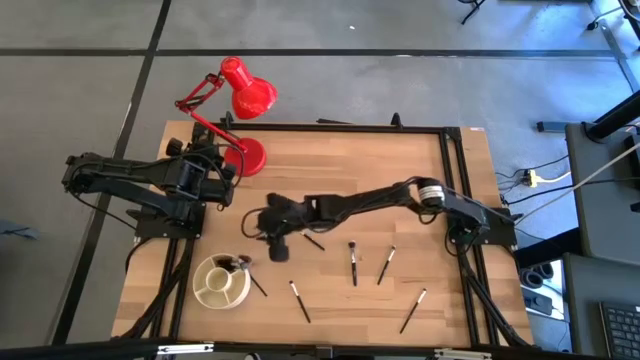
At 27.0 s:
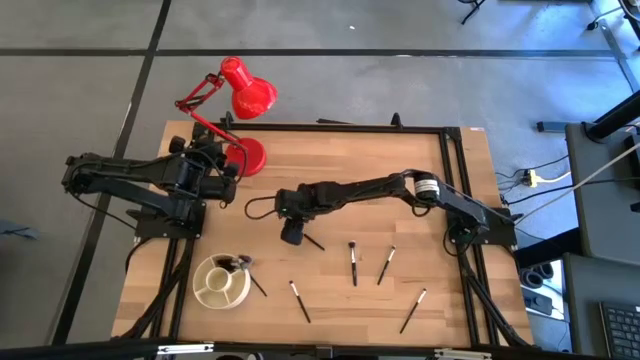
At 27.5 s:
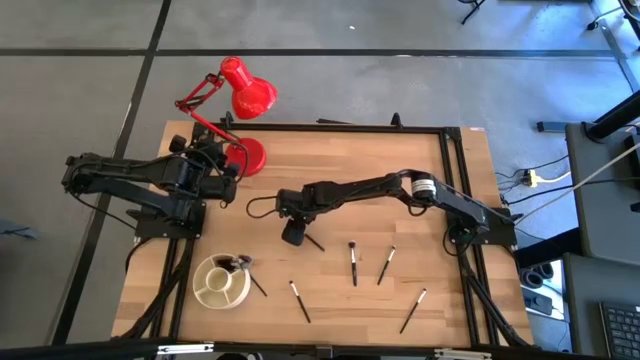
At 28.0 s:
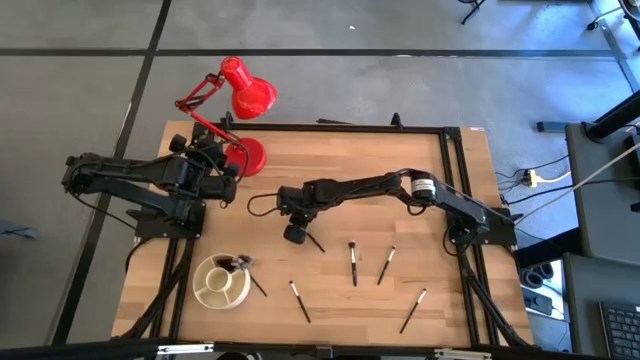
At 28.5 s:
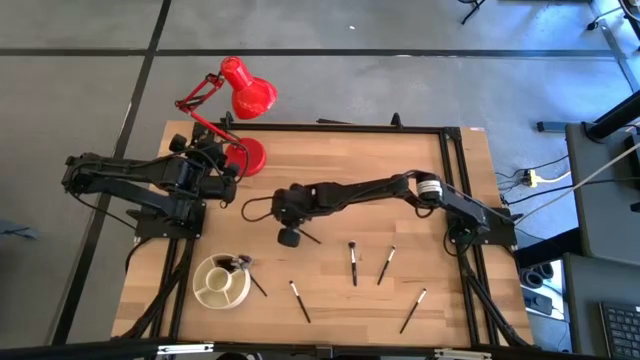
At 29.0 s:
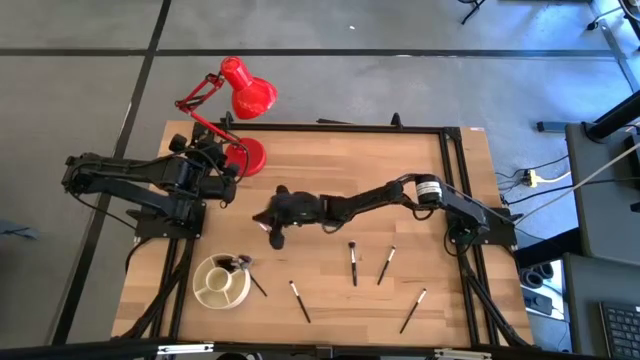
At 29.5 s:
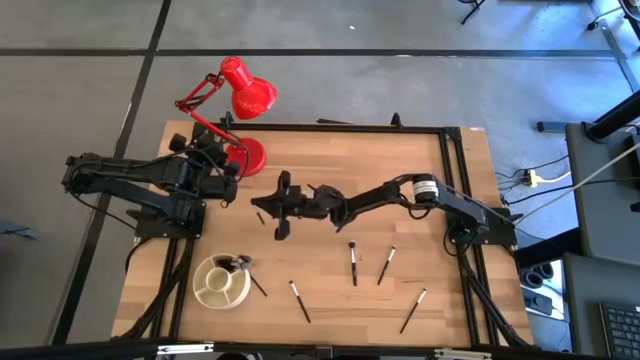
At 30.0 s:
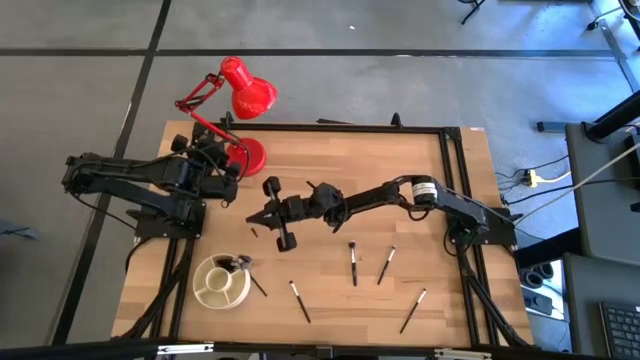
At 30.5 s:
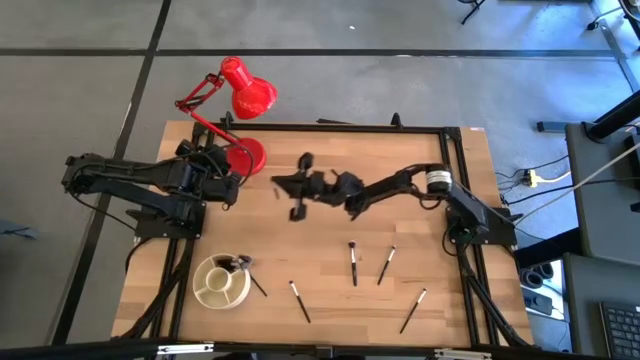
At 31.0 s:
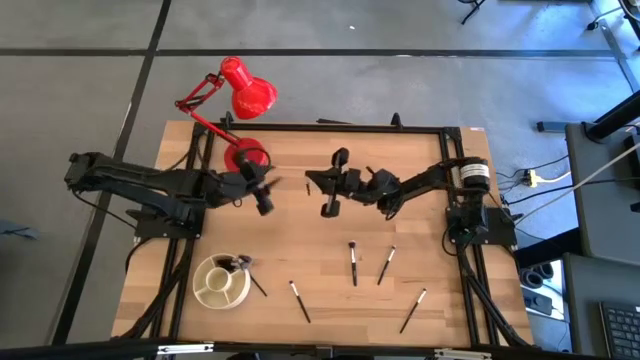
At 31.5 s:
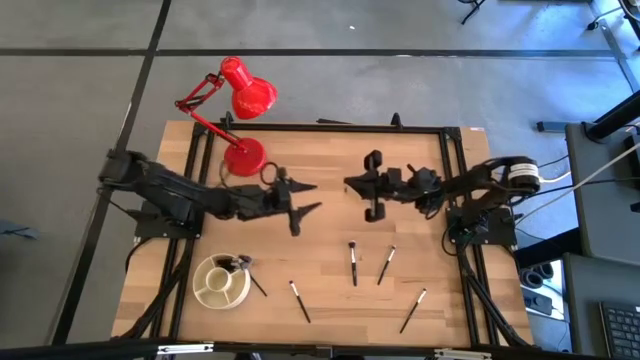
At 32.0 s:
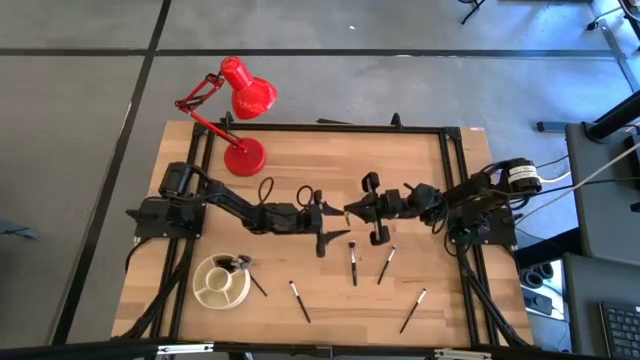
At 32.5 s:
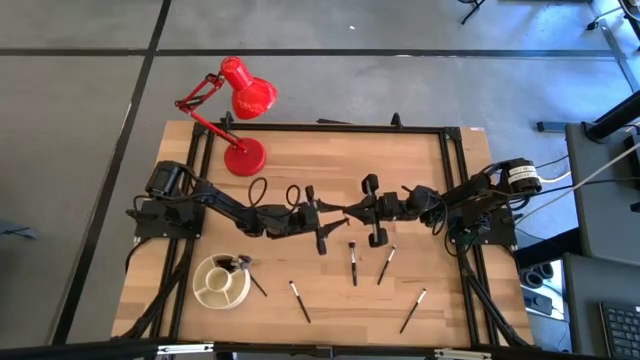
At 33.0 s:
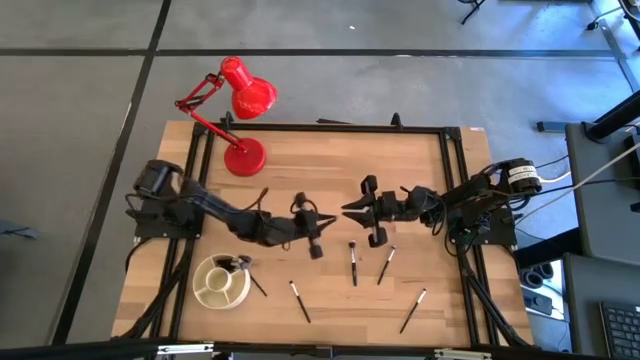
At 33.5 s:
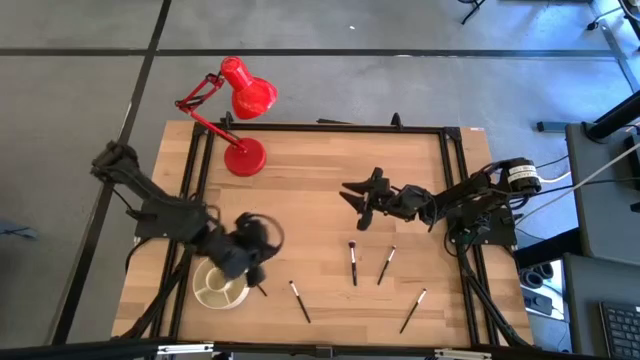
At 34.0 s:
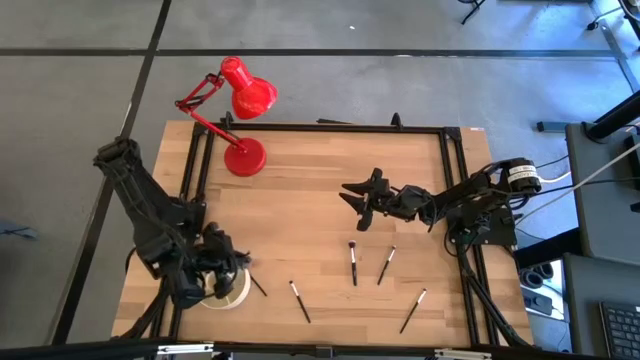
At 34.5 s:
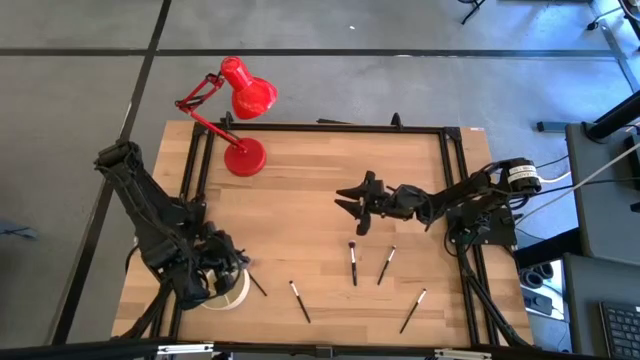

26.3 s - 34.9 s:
Task: Put items in baskets/containers
Put the black eyeshadow brush into the white organizer bin

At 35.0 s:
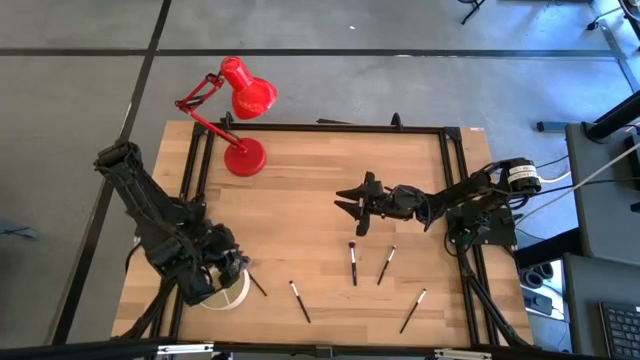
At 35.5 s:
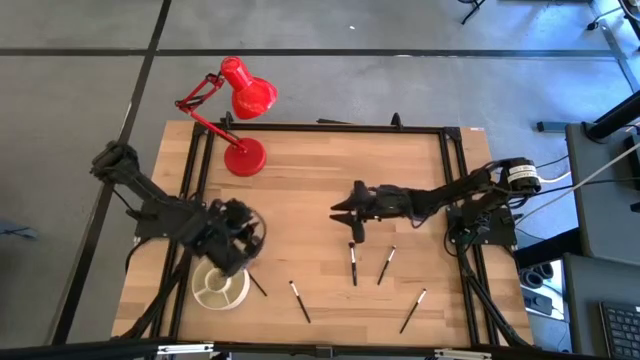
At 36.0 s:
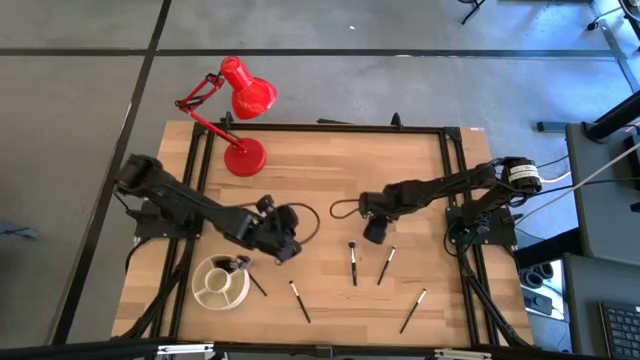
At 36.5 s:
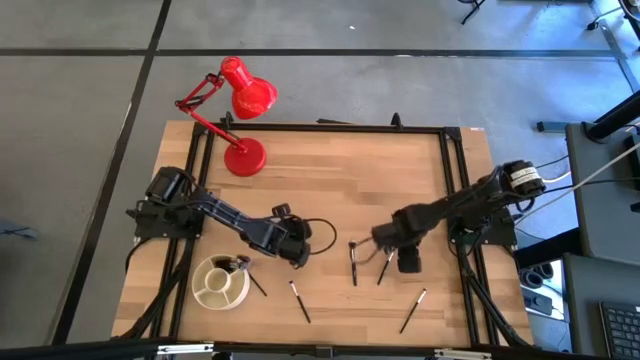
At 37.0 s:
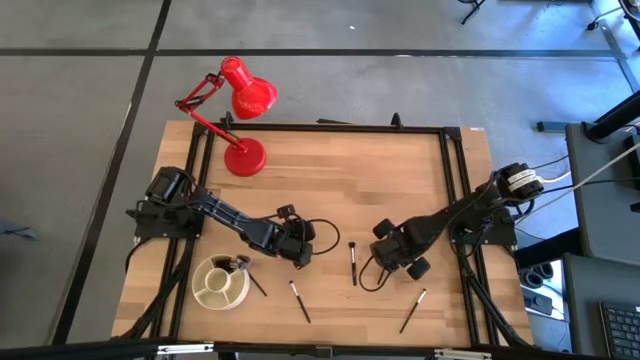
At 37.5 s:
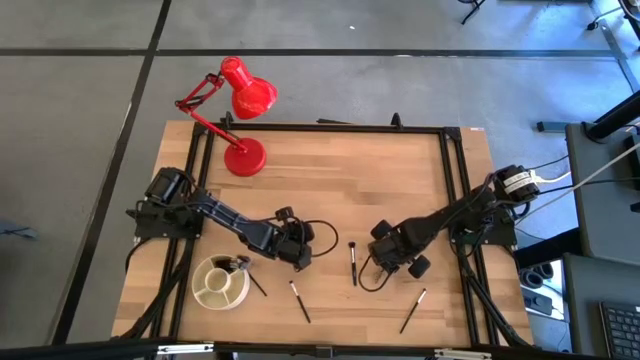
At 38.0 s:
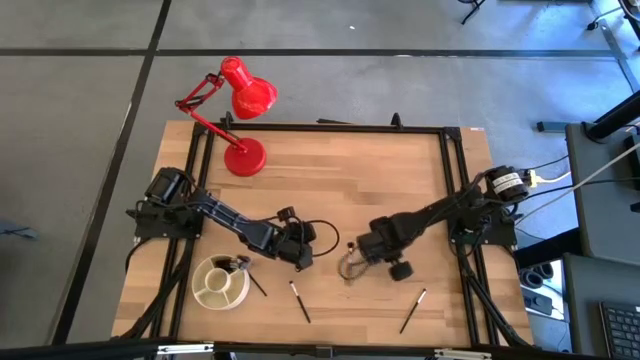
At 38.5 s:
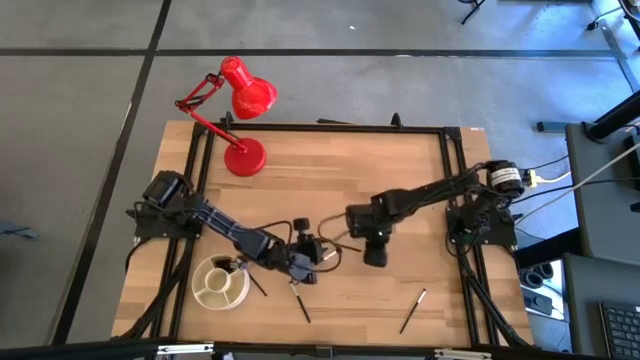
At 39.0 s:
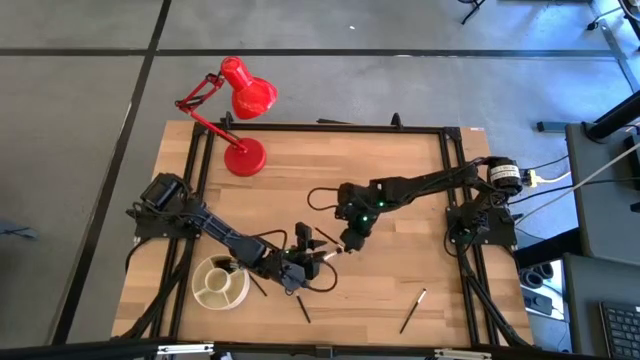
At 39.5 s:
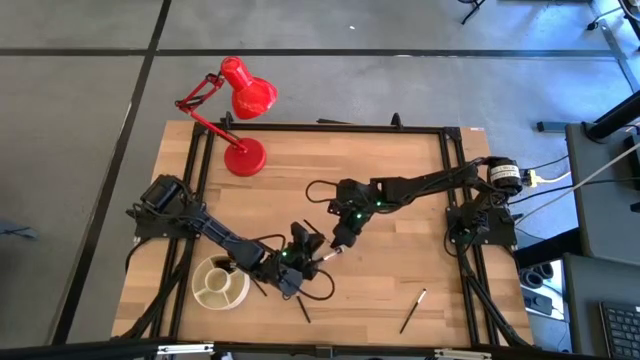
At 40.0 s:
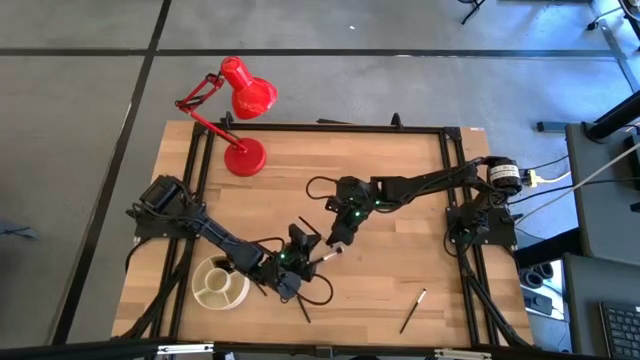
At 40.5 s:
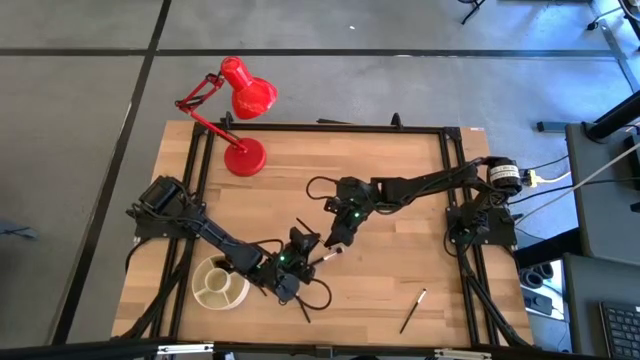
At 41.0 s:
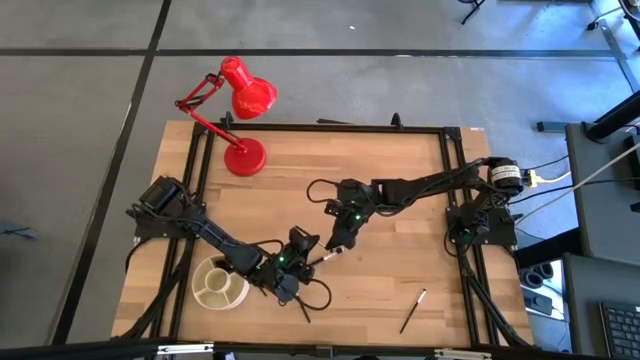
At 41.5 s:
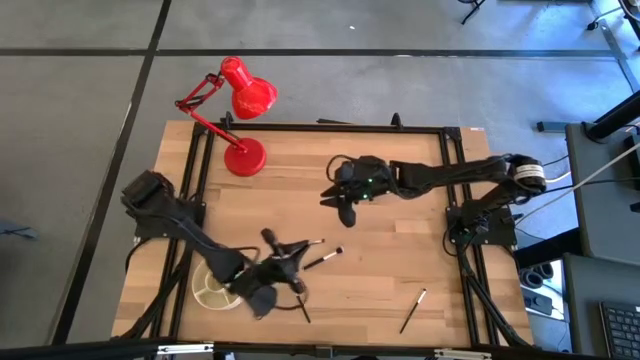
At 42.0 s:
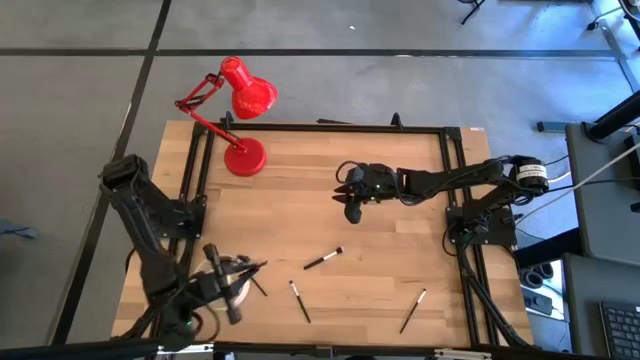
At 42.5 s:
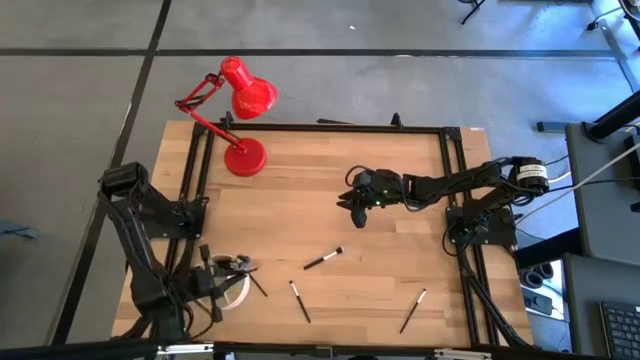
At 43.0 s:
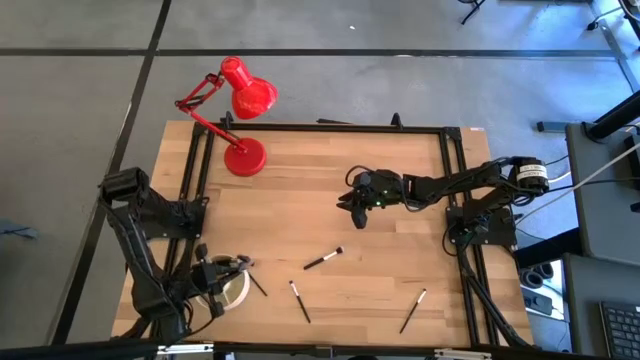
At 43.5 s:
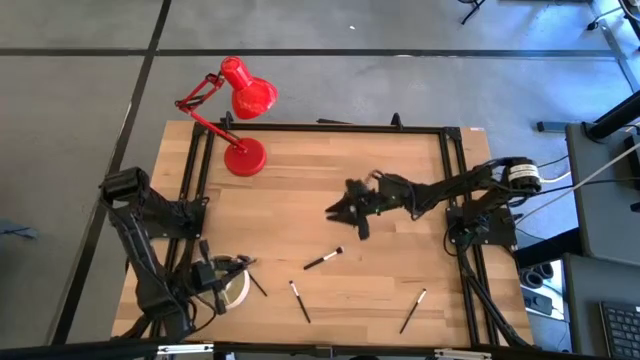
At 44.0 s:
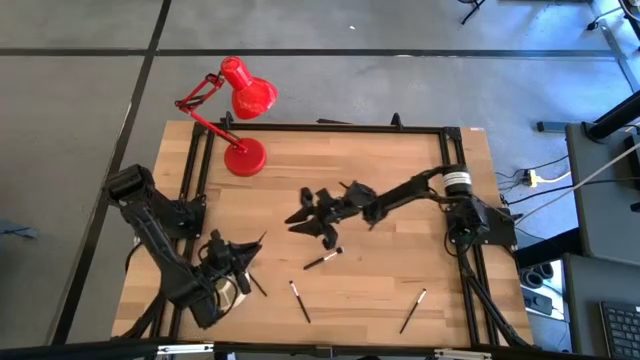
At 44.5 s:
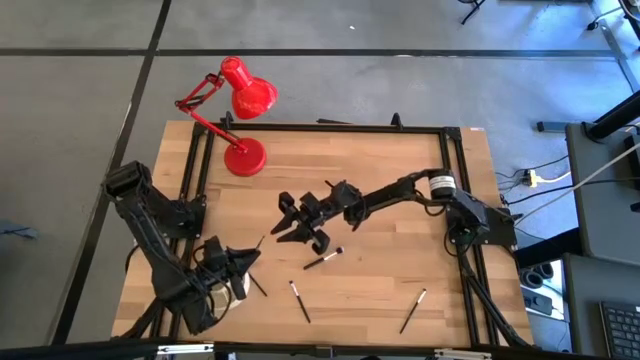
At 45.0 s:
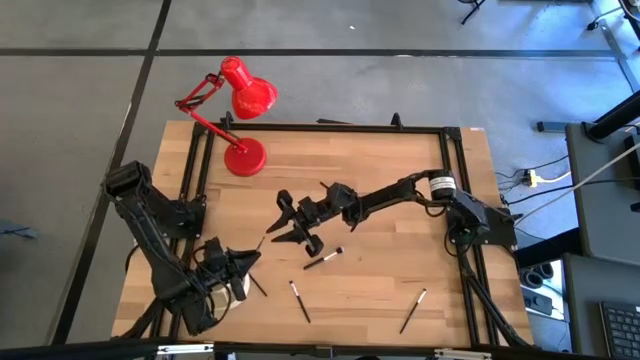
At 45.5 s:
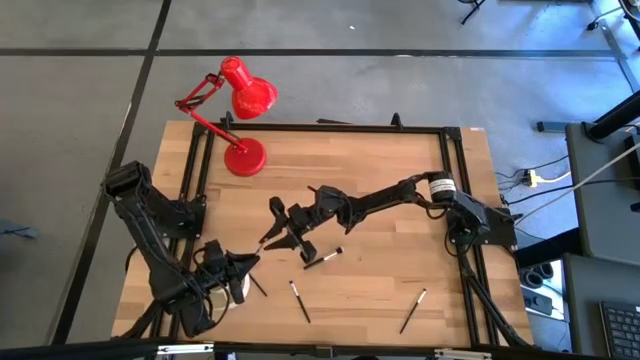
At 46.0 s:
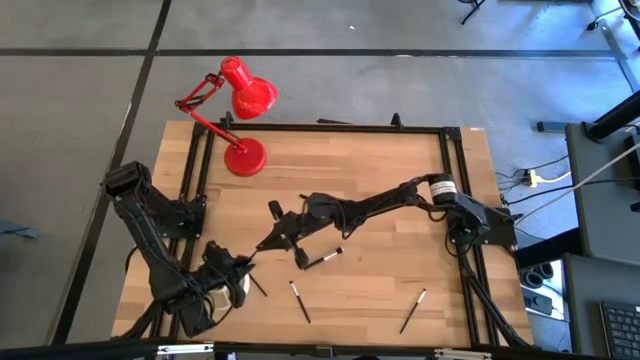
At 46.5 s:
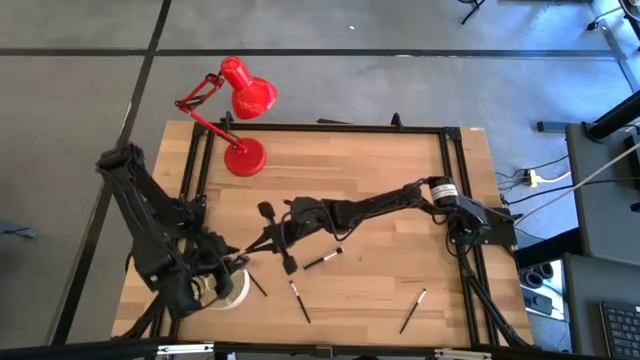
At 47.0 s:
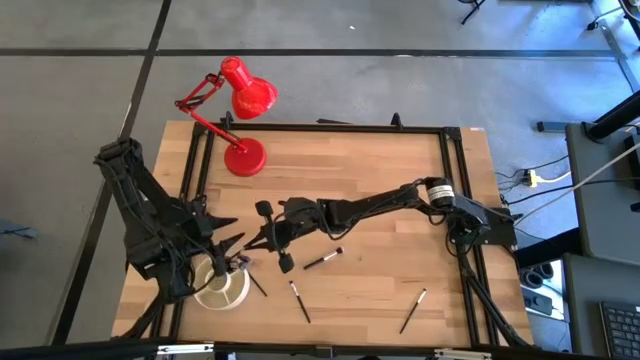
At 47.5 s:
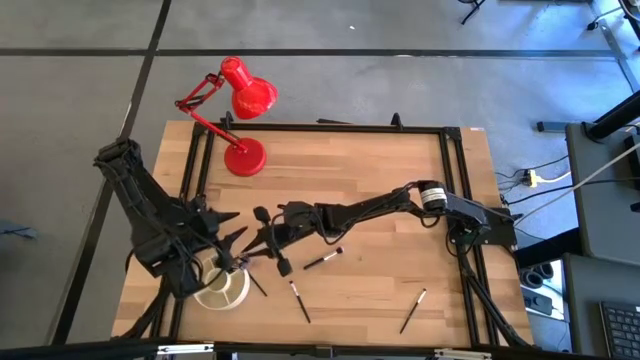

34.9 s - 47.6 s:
Put the black eyeshadow brush into the white organizer bin
